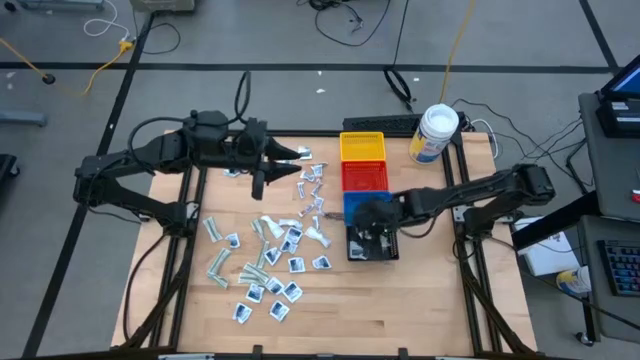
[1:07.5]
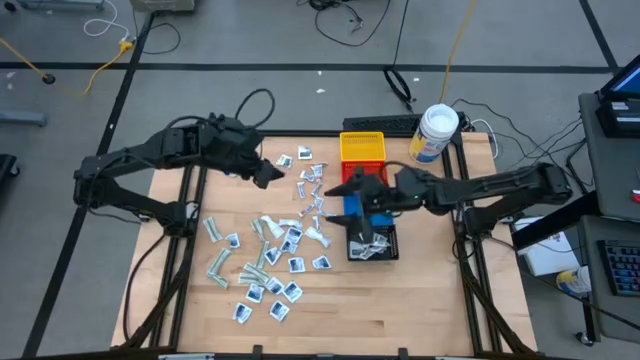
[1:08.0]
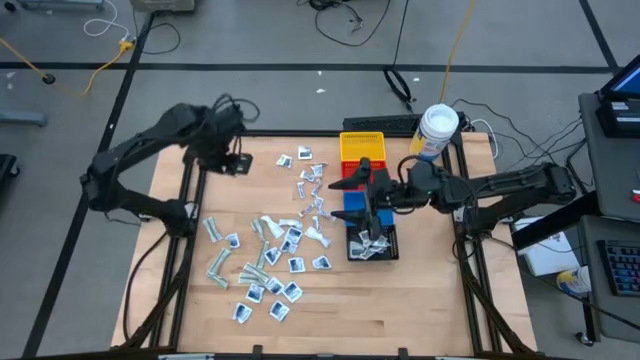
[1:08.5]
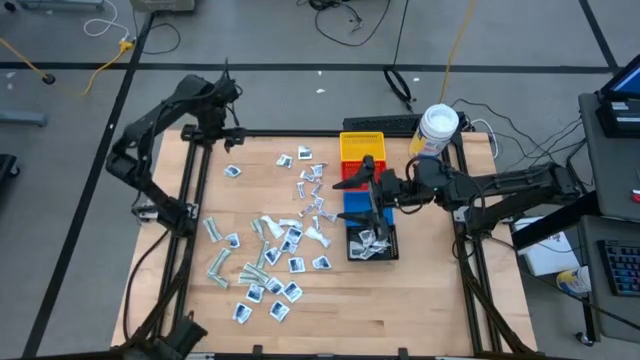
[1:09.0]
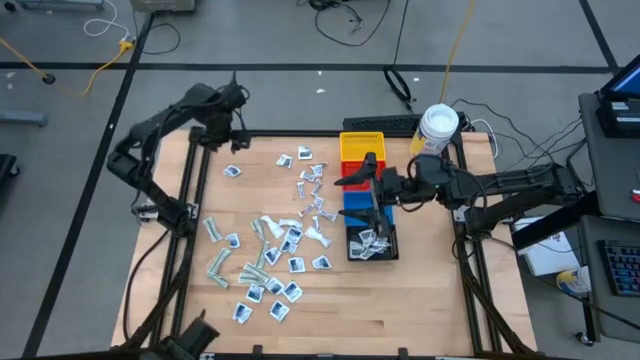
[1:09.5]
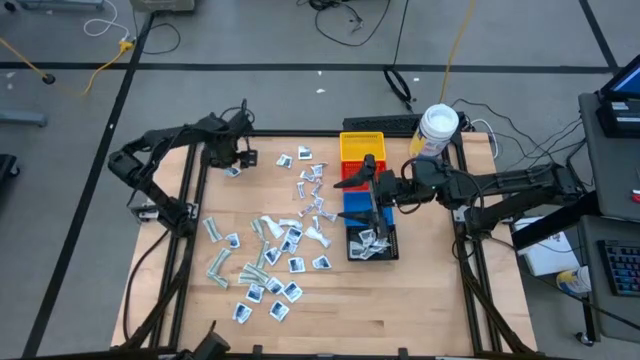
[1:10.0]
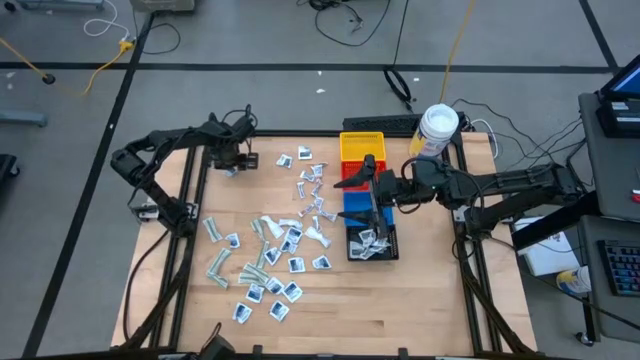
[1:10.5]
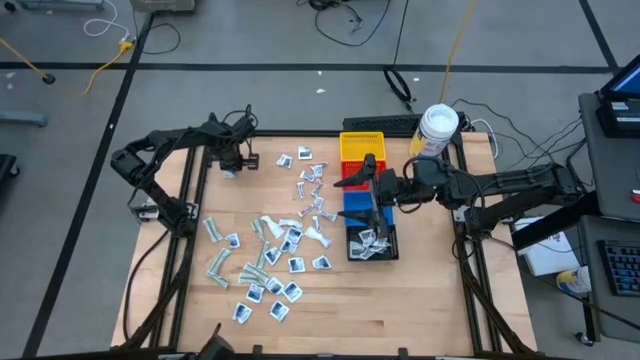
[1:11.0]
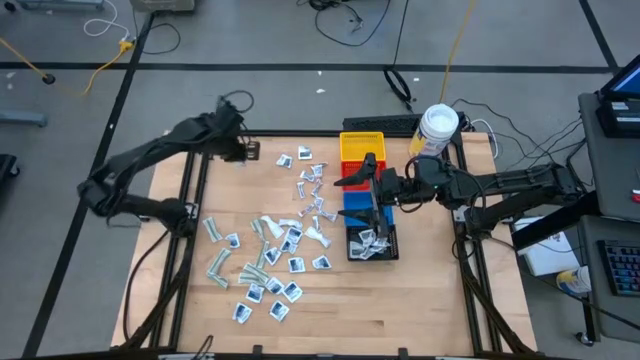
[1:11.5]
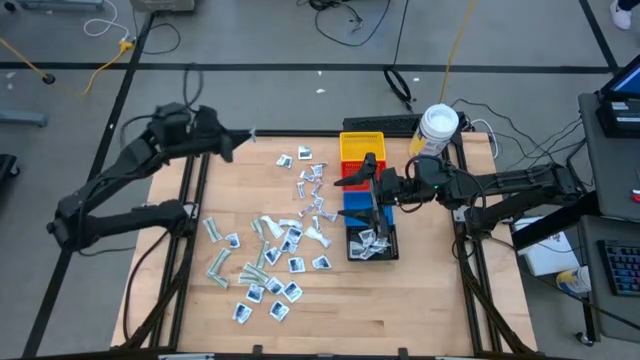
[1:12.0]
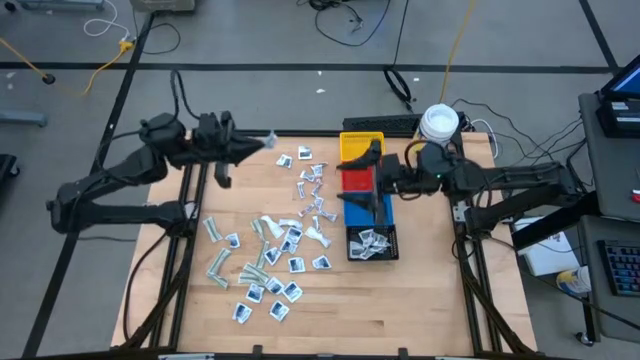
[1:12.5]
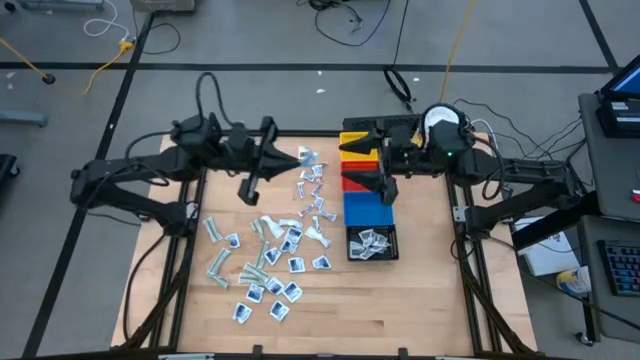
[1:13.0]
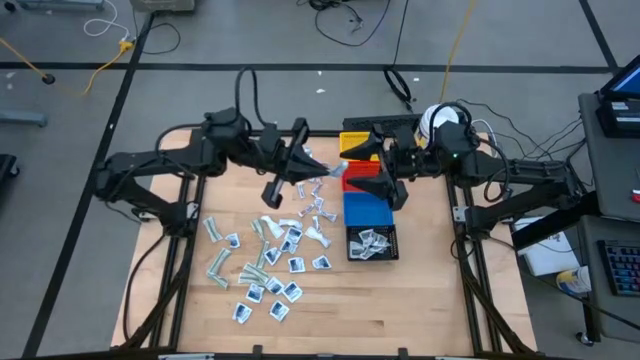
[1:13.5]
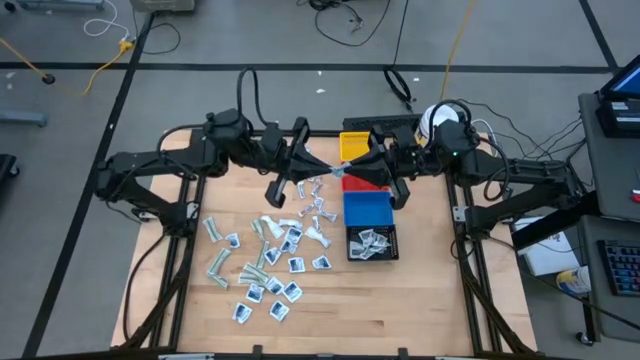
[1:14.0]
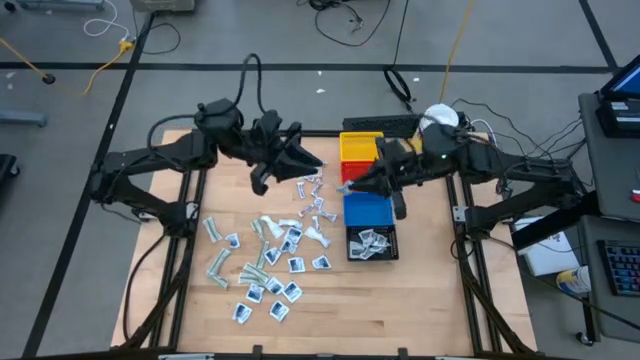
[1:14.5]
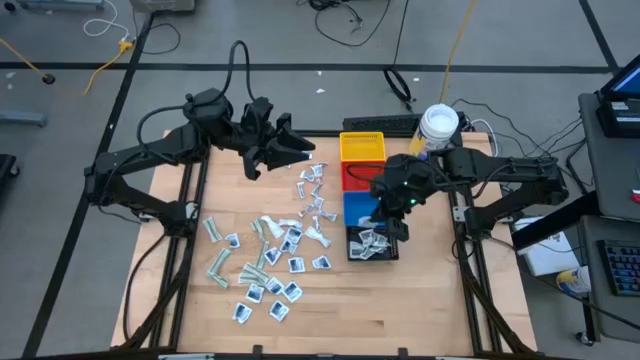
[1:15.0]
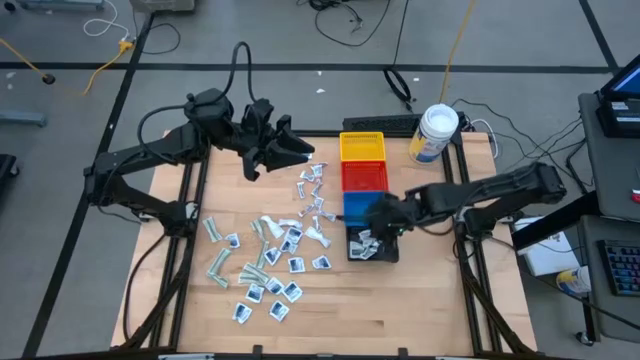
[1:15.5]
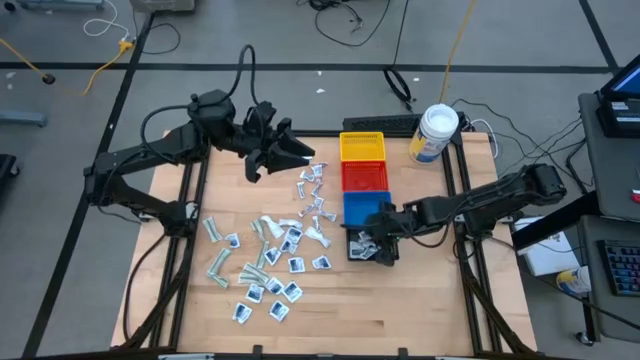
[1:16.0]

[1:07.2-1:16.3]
Task: Pick & Place First Aid Supplies
Put the black towelette pack into the black bin

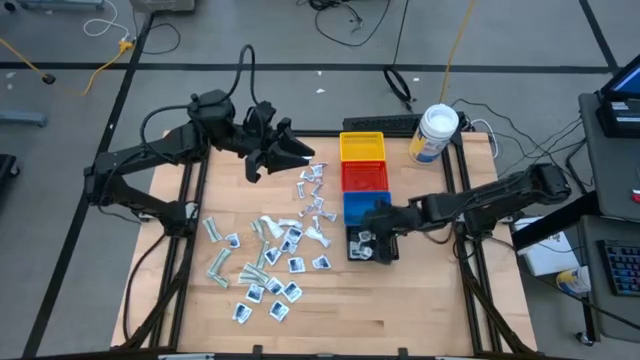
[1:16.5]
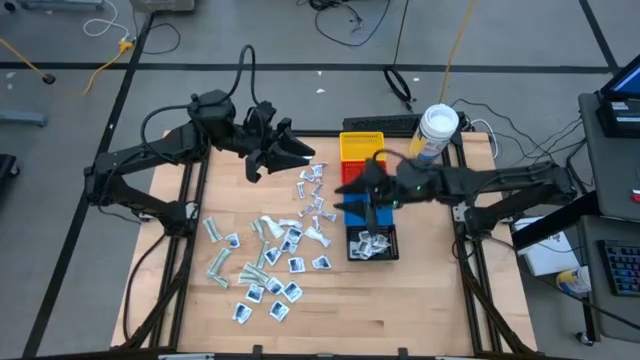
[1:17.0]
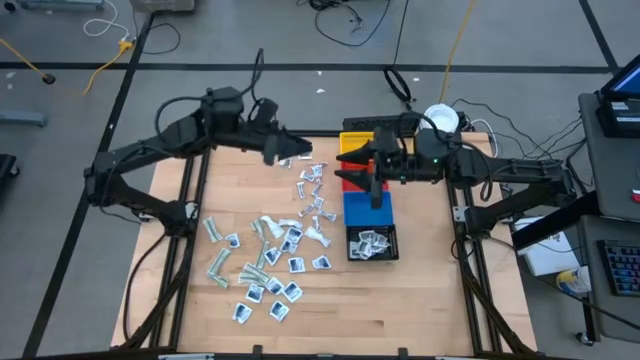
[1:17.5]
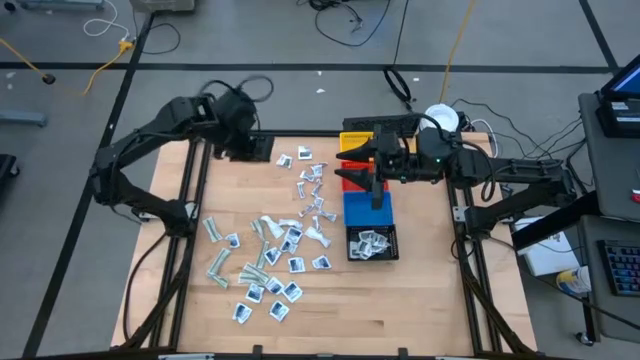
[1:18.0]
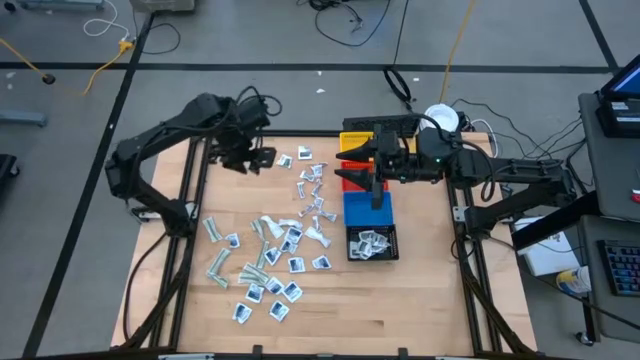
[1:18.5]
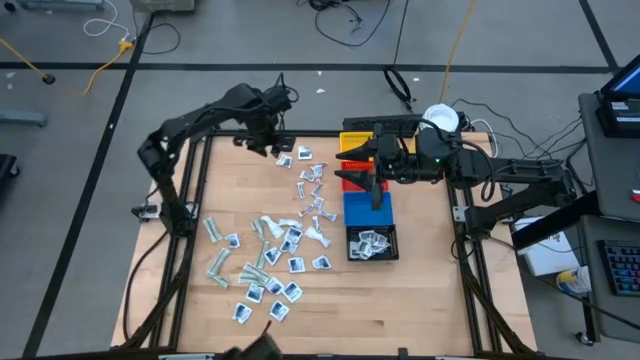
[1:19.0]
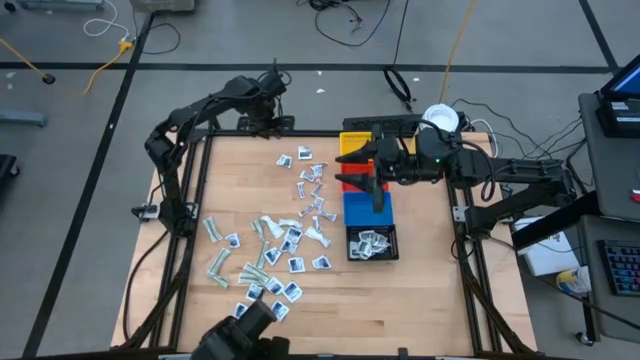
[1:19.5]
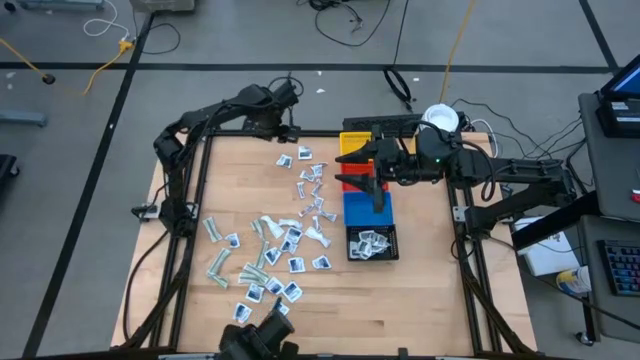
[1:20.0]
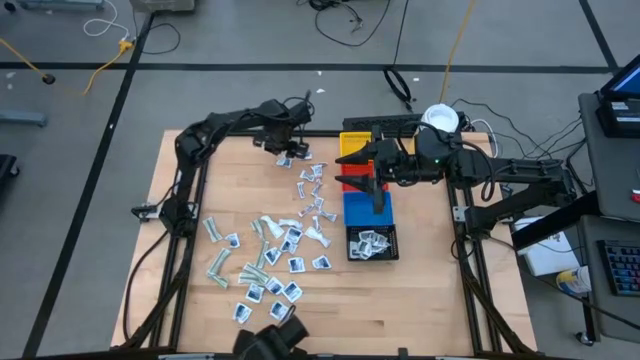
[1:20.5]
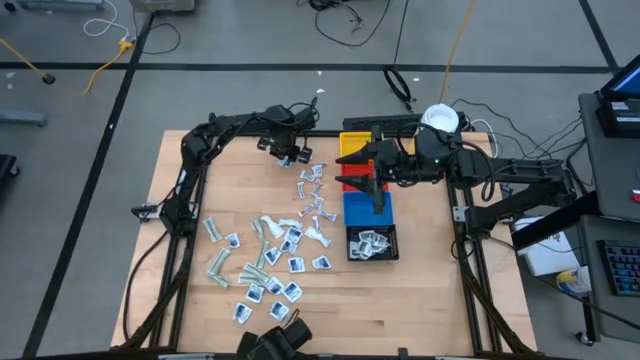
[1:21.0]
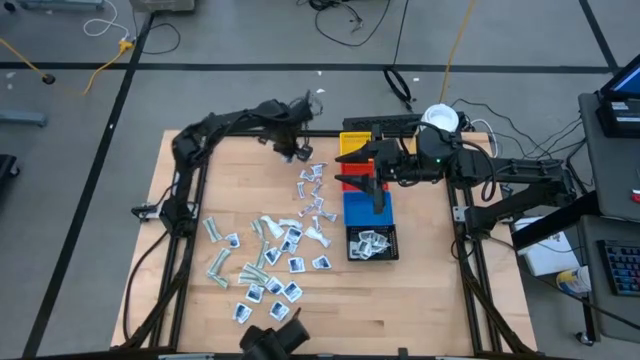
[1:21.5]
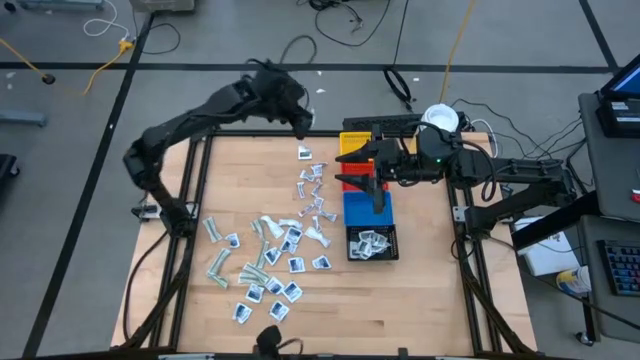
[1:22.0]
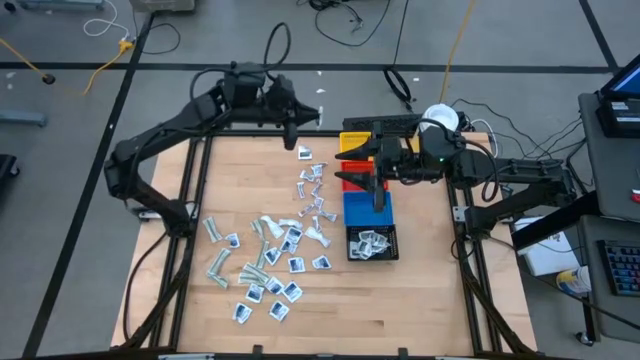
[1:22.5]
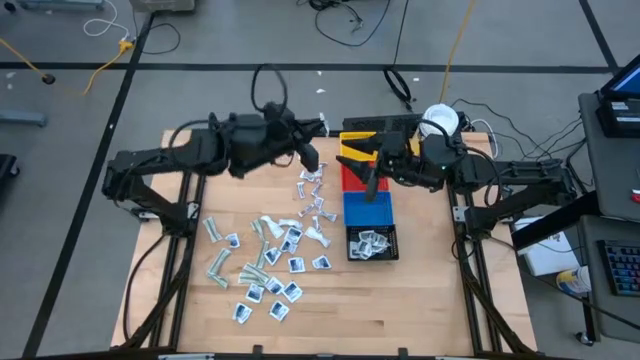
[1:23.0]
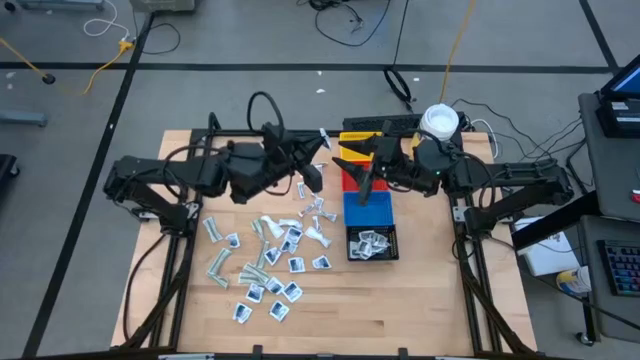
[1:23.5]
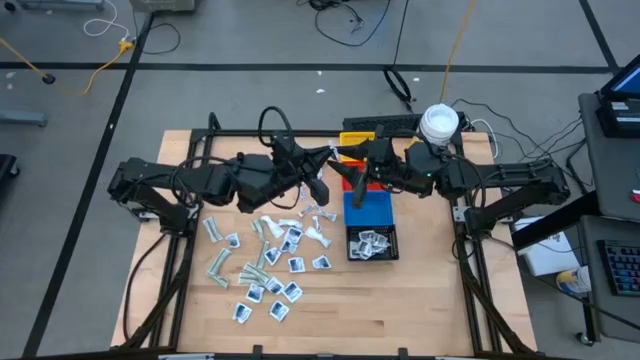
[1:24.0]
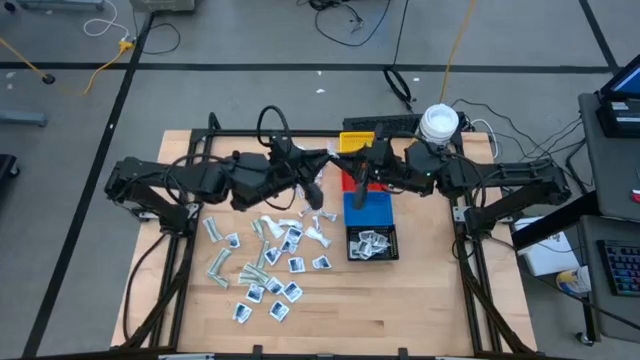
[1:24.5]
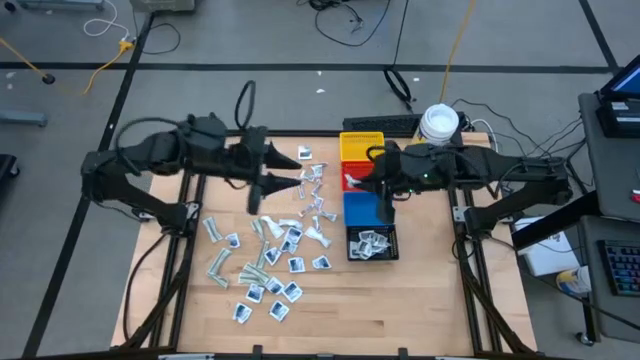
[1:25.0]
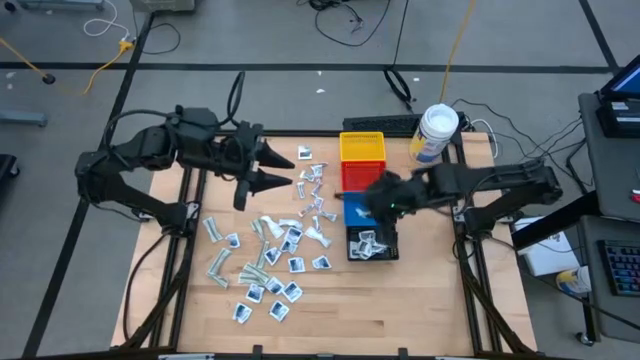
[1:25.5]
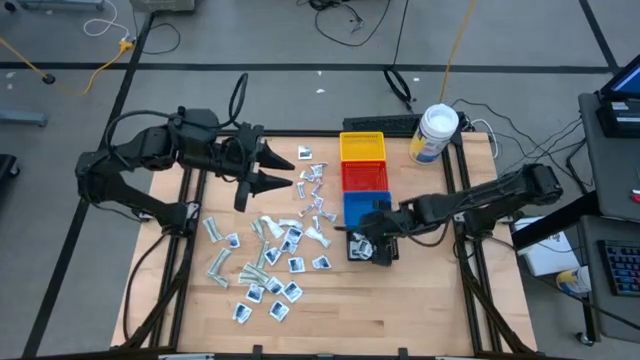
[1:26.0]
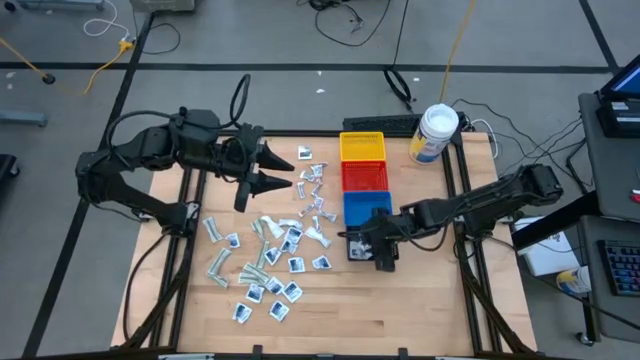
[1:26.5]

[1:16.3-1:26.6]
Put the black towelette pack into the black bin

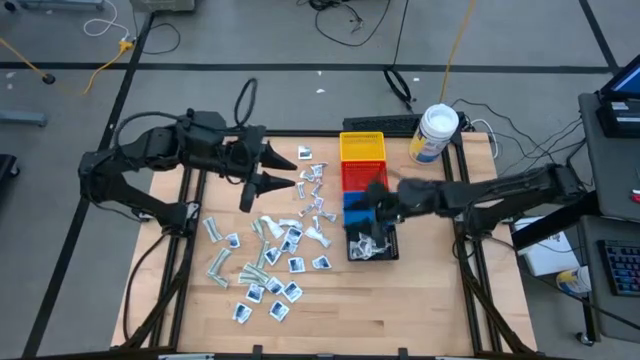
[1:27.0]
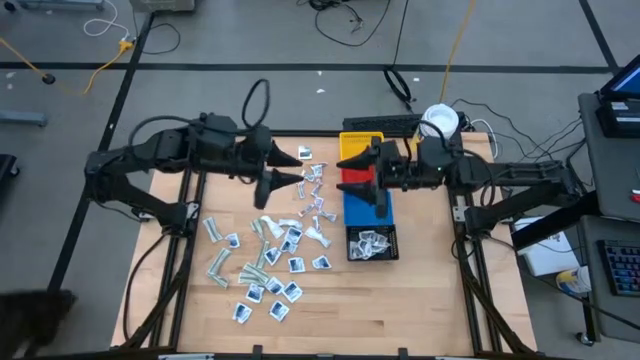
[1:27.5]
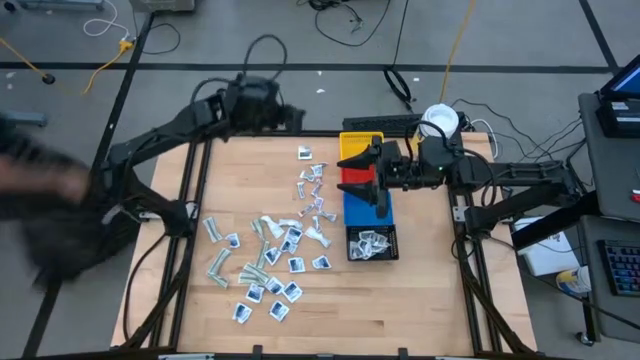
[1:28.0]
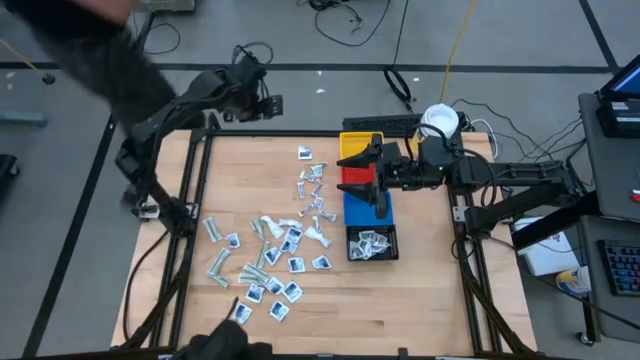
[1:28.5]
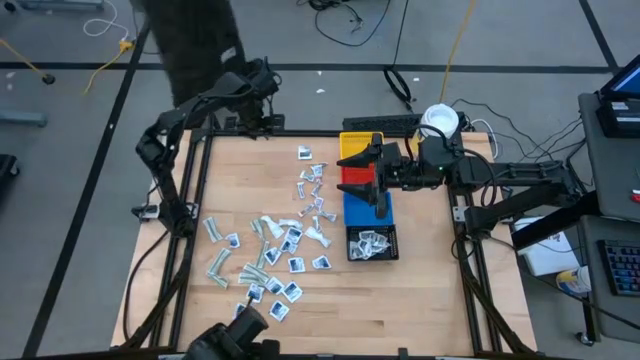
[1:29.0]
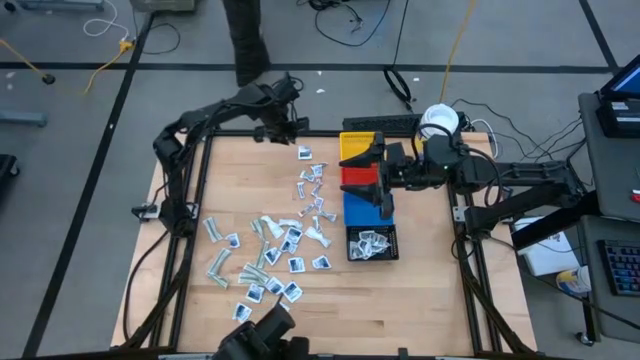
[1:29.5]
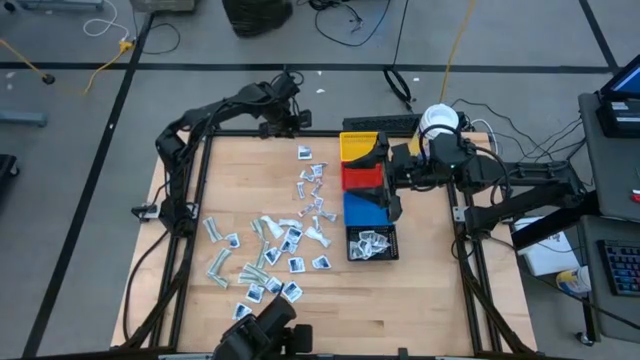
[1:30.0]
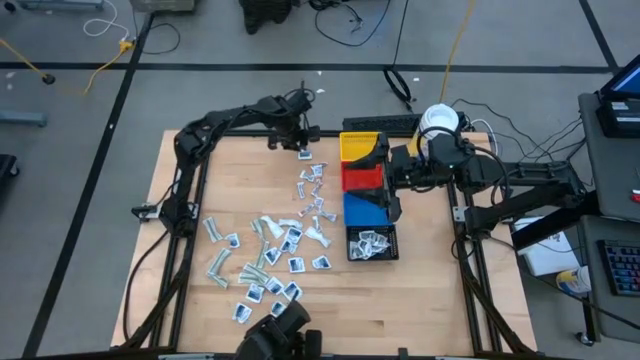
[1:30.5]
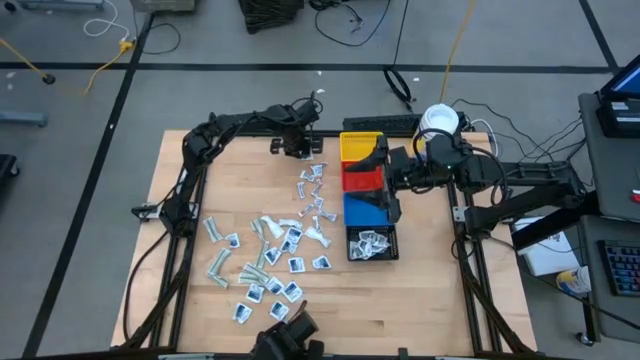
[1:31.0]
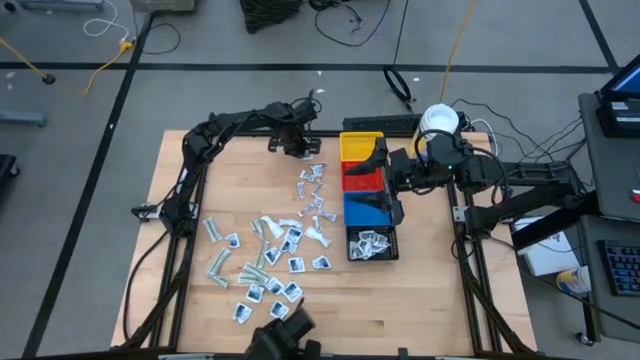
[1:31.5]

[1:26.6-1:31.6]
Put the black towelette pack into the black bin
